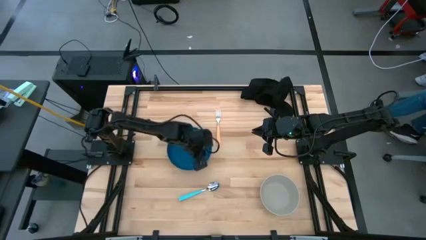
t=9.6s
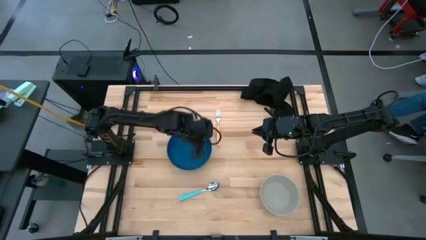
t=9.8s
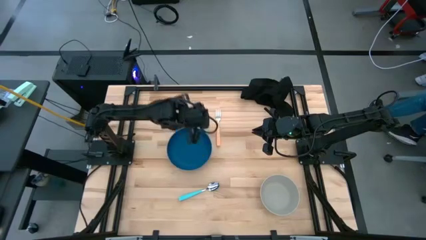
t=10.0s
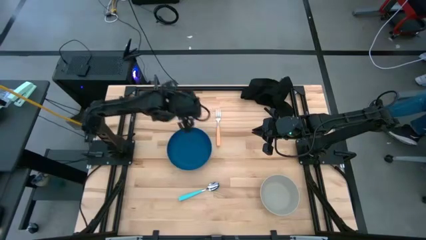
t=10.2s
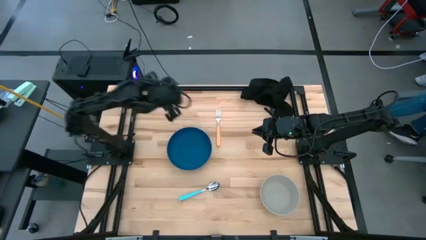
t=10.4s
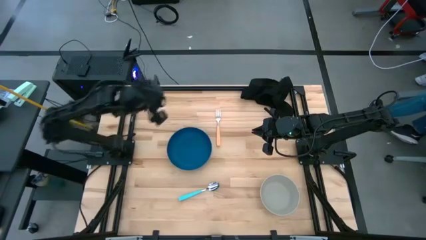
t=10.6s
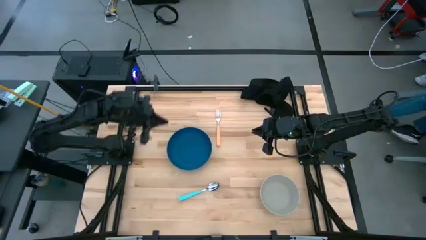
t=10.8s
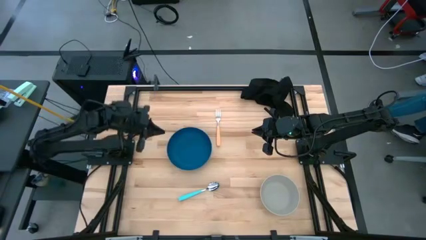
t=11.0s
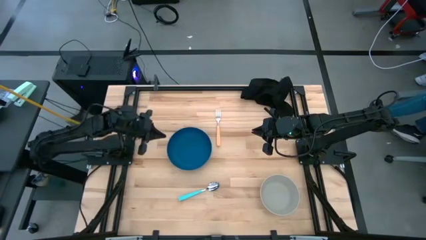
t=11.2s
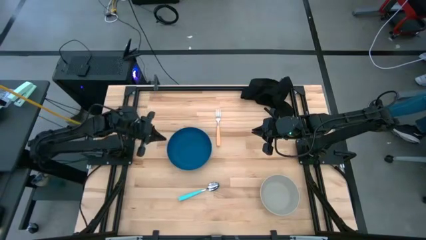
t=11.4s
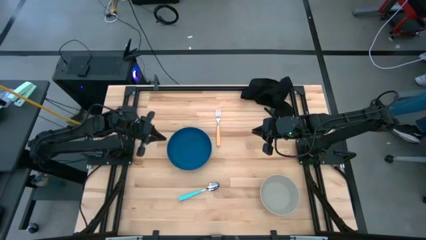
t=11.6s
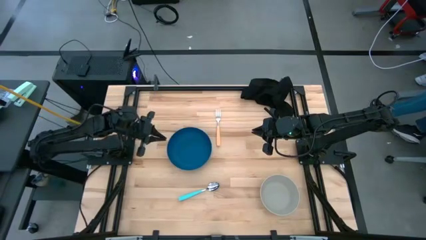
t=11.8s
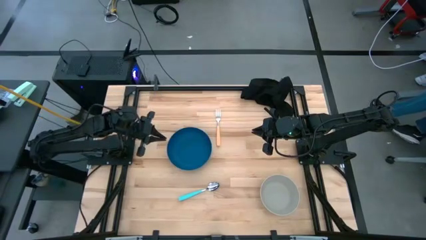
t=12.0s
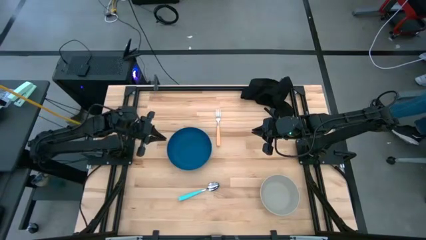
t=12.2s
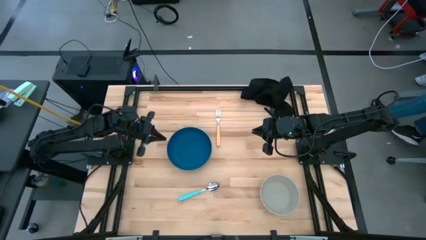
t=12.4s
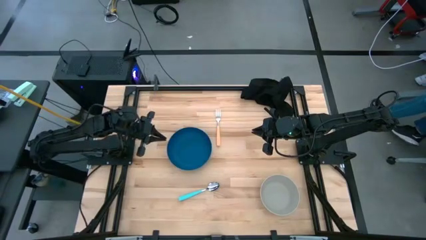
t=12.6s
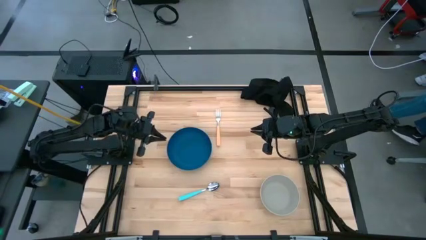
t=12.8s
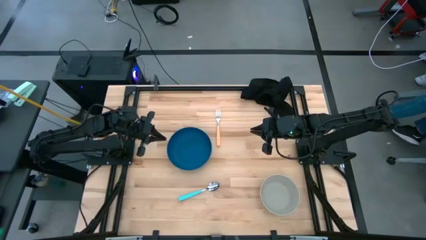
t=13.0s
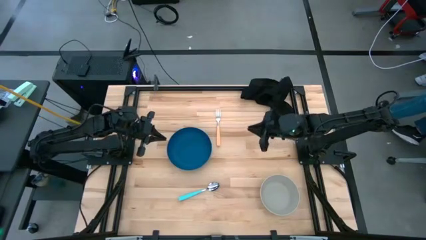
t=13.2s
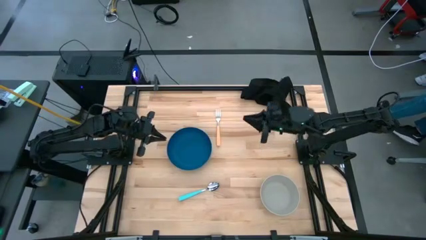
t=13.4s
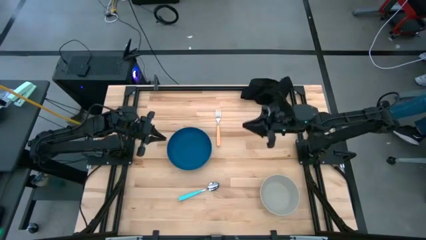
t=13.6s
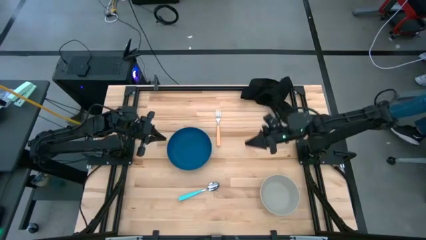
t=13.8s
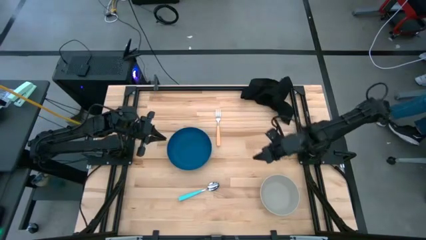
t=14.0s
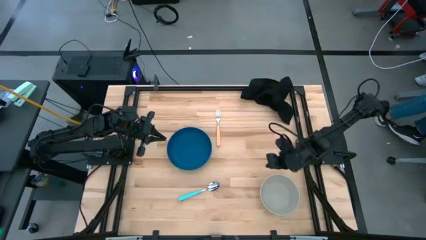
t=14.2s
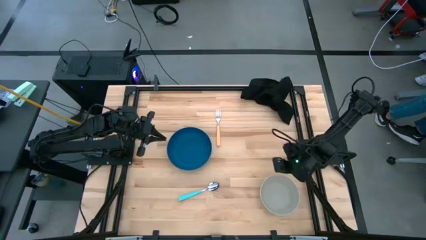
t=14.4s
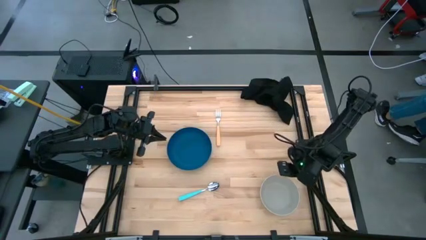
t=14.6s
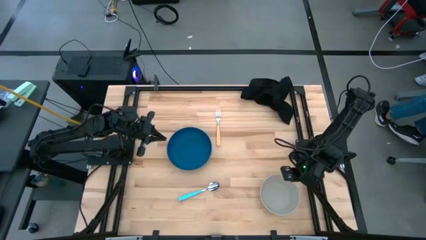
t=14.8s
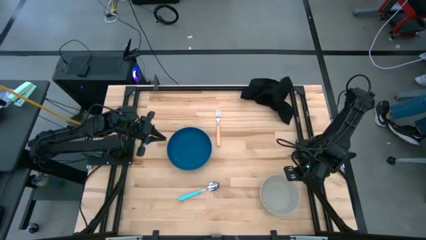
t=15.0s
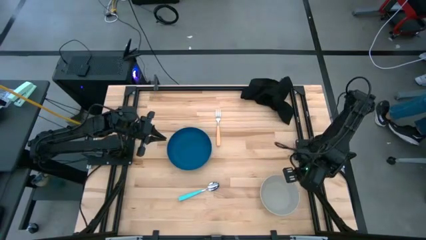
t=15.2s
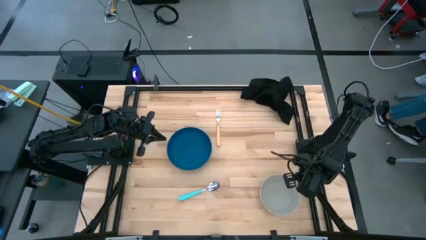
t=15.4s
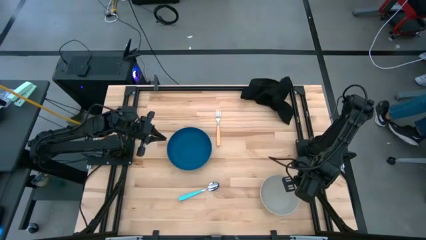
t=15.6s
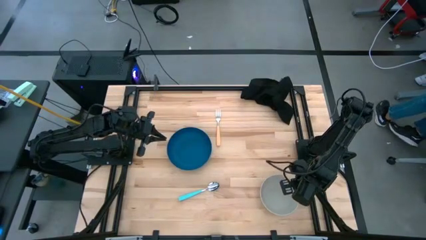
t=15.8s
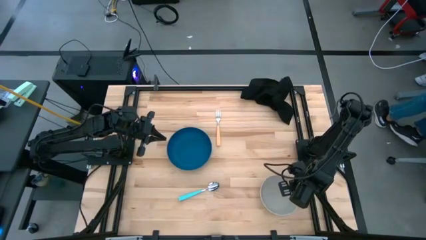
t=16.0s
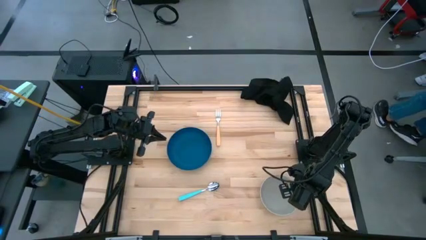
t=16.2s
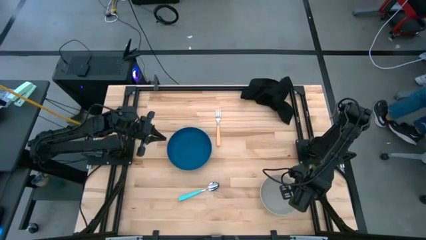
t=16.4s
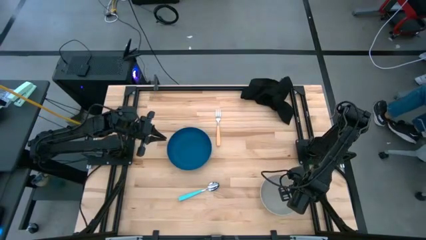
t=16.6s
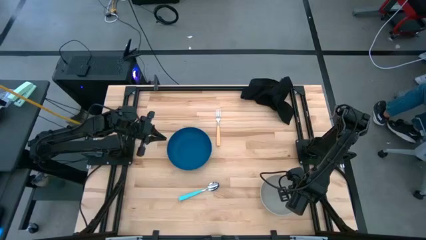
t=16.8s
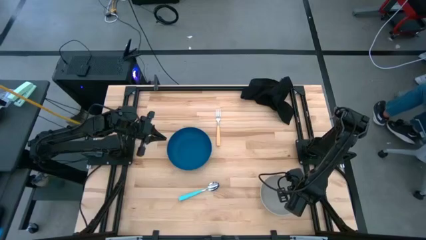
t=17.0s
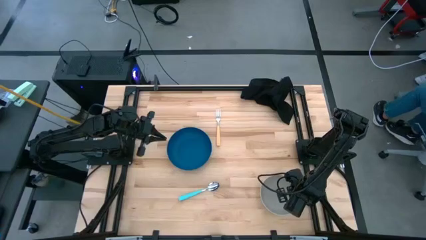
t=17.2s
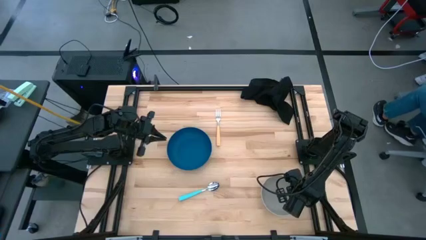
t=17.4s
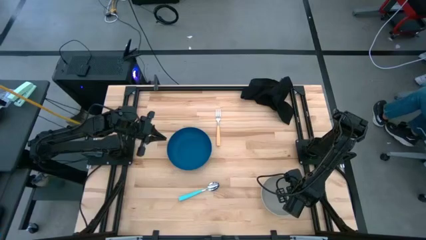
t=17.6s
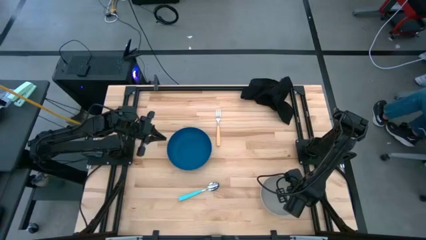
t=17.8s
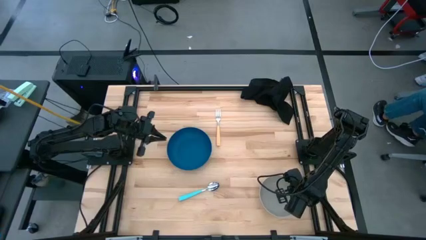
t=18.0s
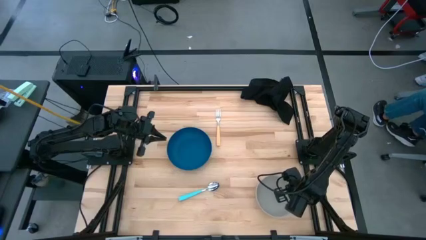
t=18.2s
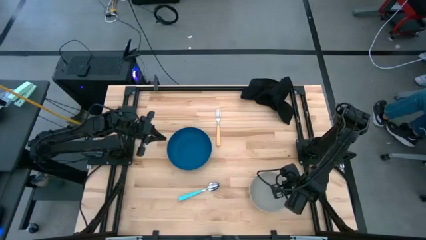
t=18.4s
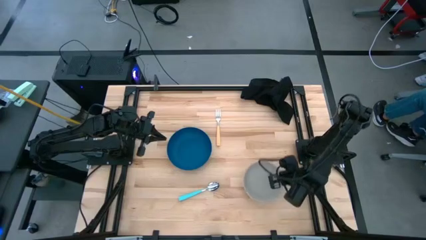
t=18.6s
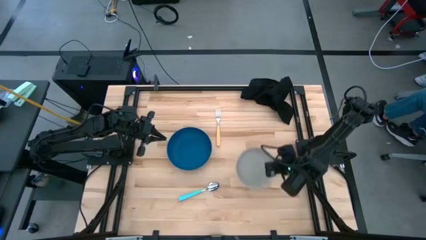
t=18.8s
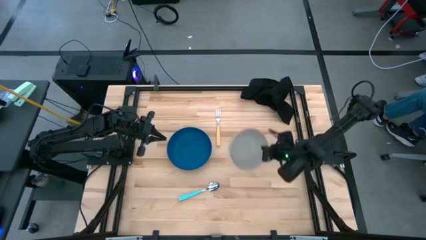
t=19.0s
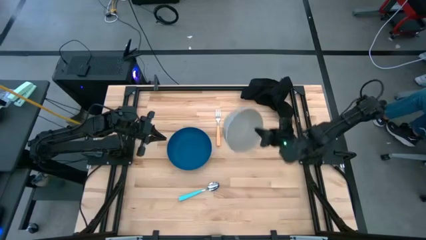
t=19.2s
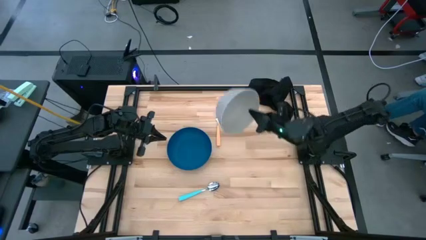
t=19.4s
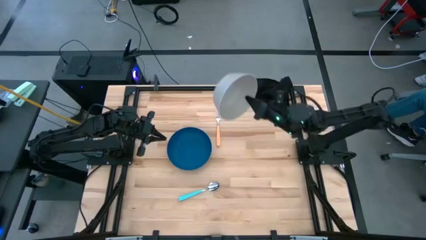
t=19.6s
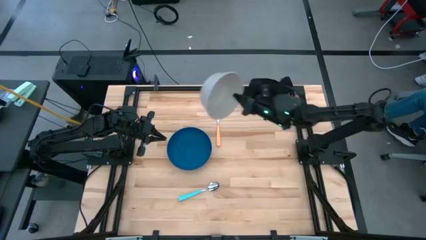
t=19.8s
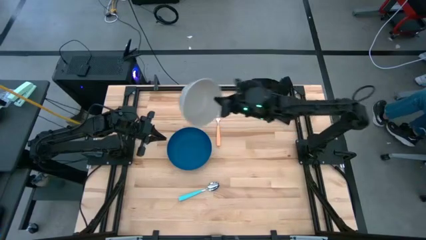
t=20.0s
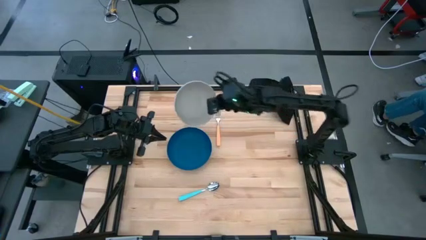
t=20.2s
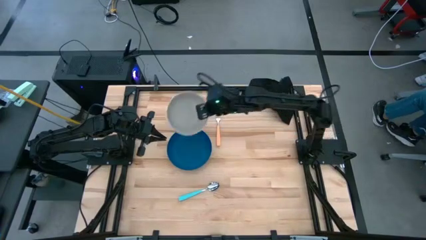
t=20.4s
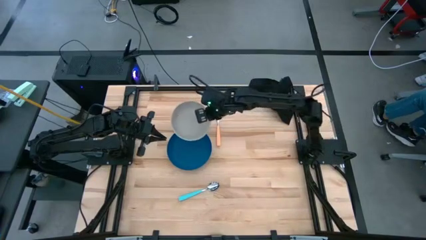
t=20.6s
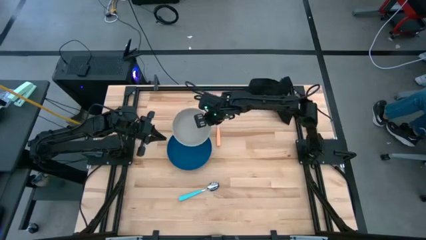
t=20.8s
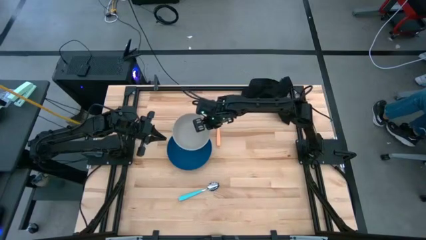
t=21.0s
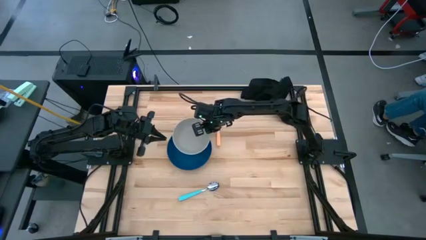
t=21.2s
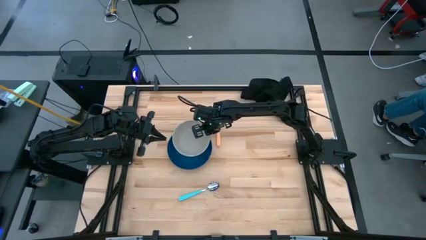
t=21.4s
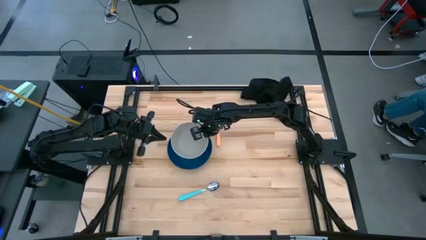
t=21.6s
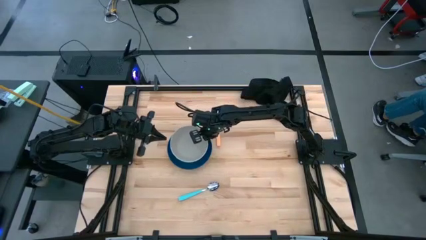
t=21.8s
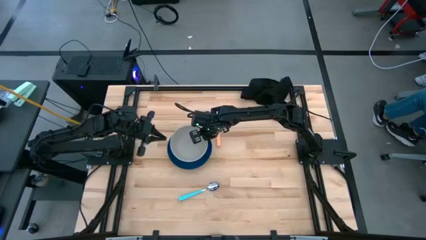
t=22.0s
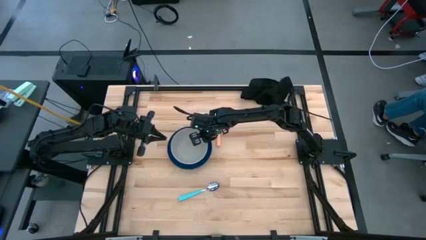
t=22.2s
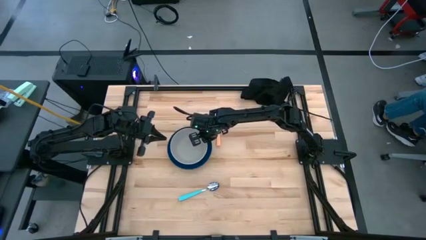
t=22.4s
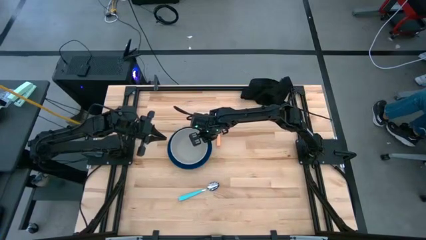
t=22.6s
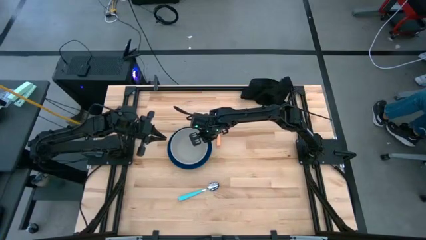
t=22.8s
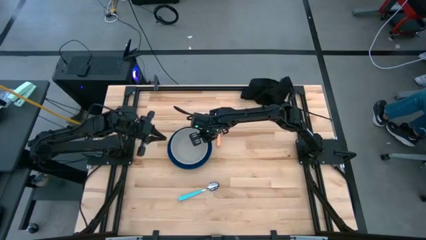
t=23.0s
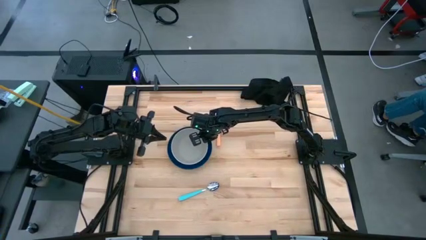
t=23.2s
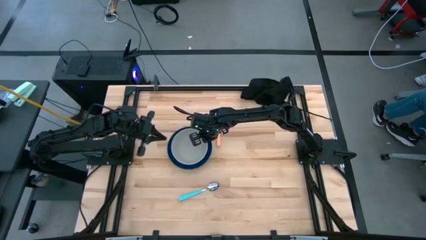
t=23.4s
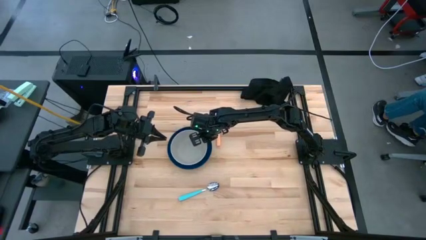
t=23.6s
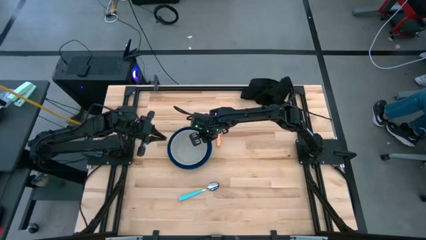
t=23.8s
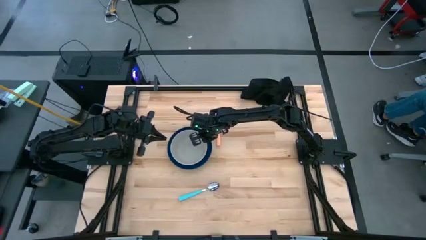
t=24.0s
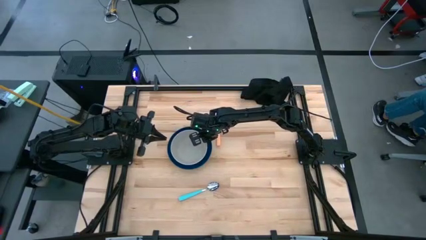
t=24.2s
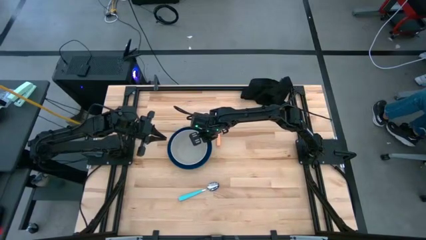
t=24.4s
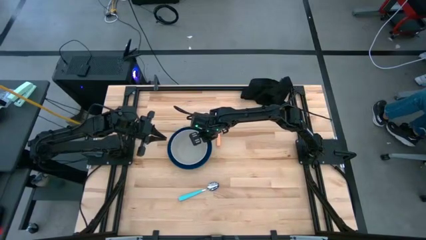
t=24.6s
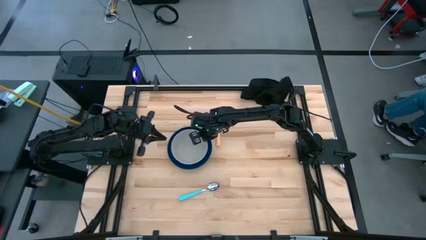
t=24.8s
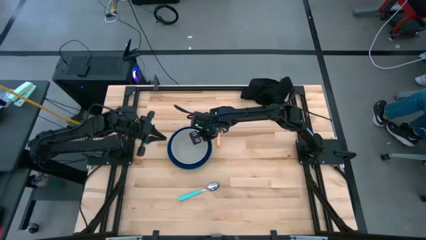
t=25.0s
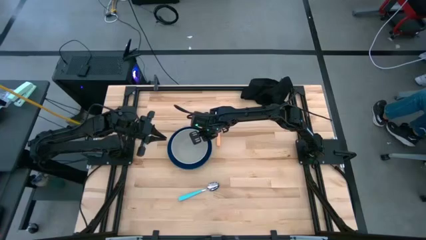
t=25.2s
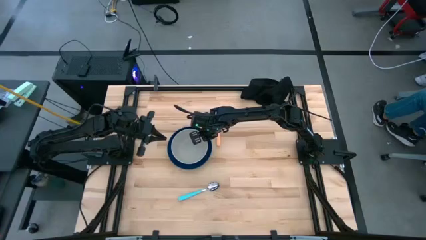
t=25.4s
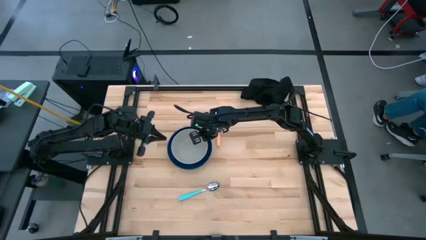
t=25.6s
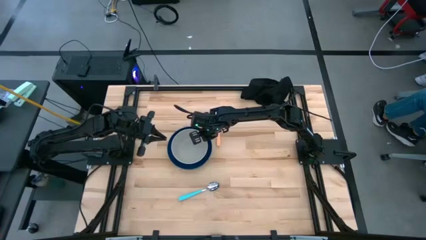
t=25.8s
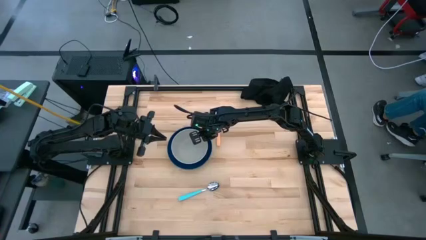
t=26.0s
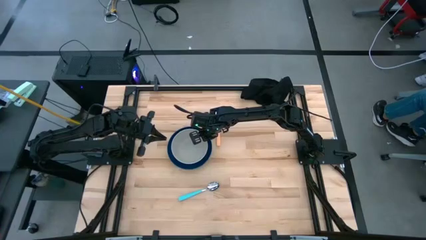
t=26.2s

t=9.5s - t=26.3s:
Task: Set table place
Put the gray bowl on top of the blue bowl on the table
